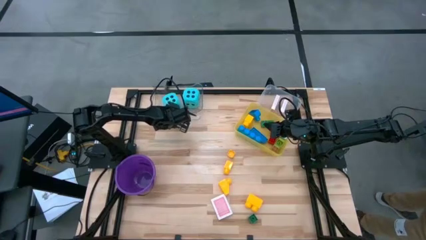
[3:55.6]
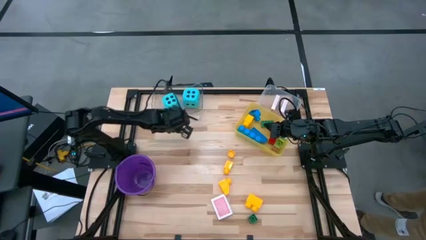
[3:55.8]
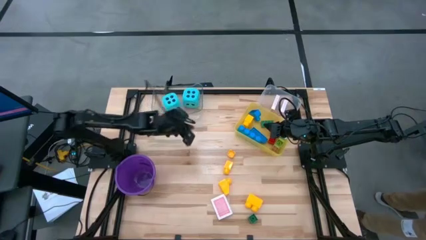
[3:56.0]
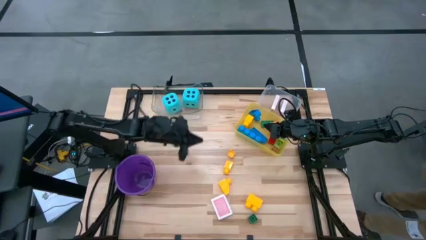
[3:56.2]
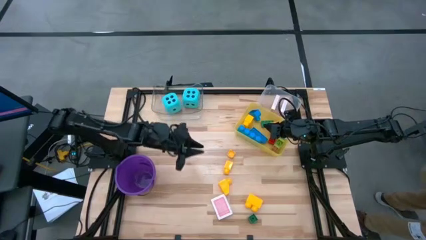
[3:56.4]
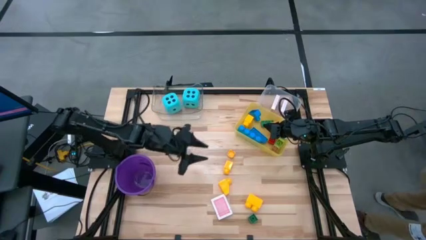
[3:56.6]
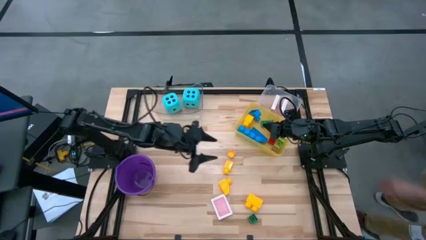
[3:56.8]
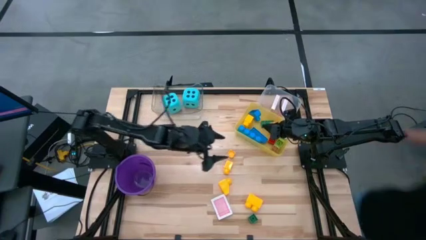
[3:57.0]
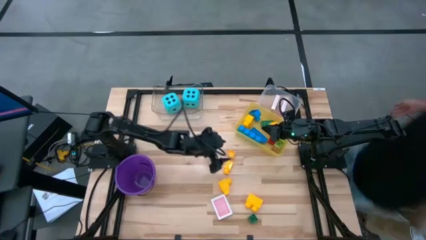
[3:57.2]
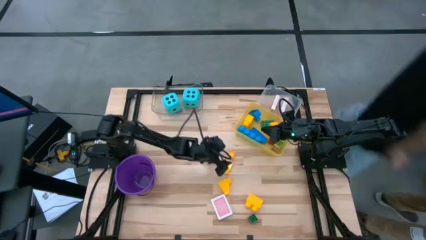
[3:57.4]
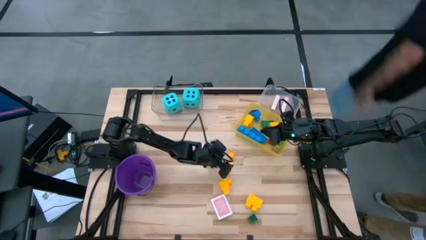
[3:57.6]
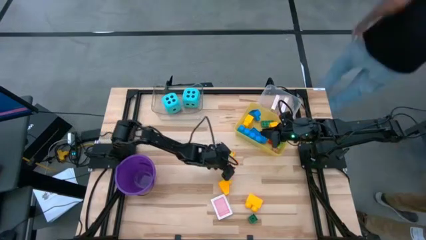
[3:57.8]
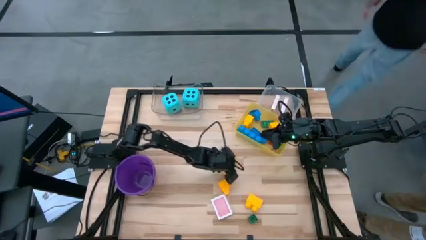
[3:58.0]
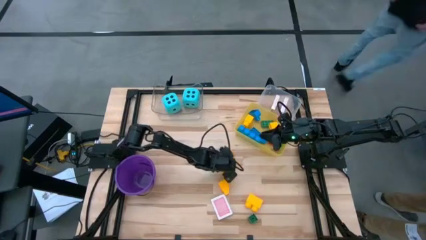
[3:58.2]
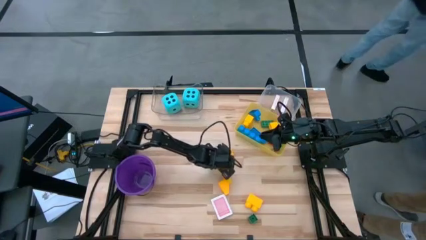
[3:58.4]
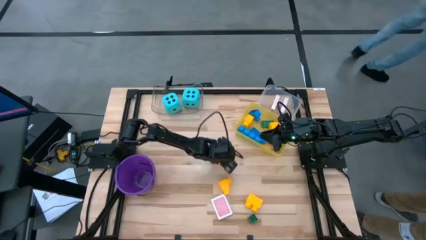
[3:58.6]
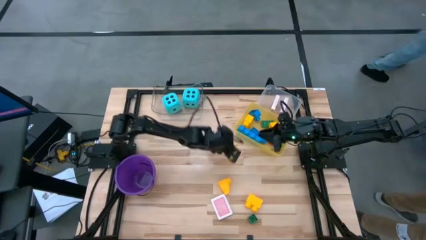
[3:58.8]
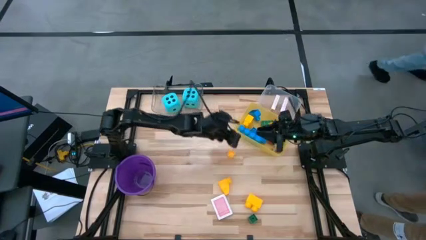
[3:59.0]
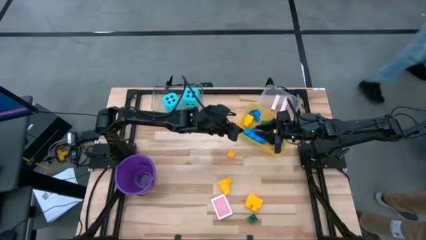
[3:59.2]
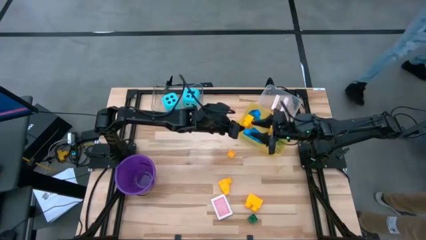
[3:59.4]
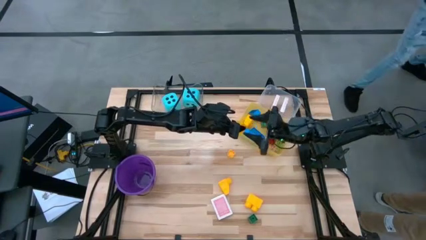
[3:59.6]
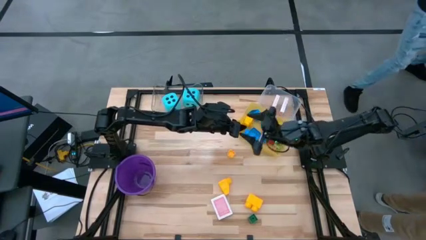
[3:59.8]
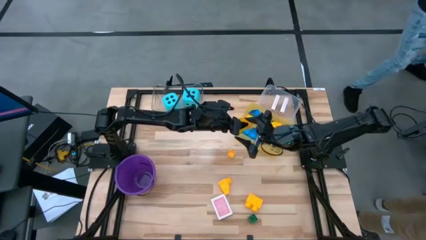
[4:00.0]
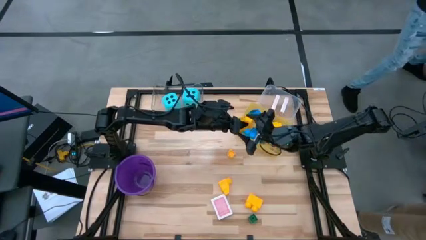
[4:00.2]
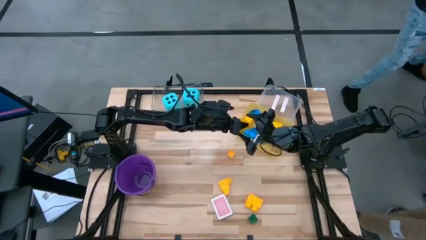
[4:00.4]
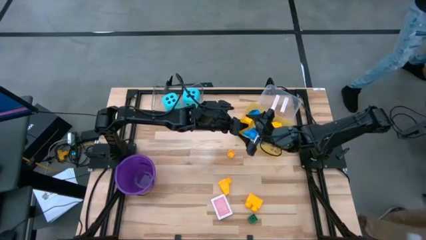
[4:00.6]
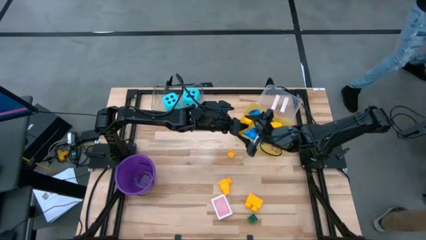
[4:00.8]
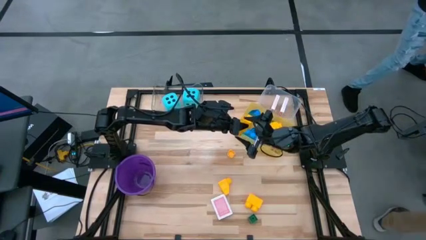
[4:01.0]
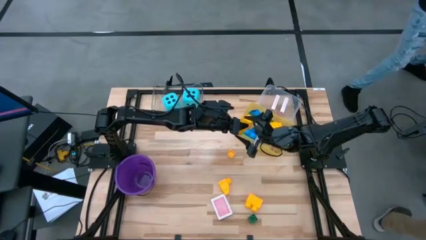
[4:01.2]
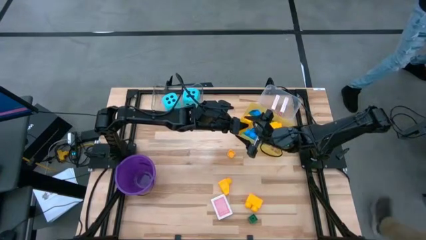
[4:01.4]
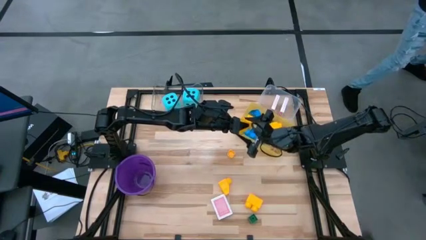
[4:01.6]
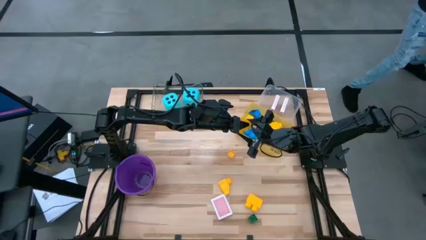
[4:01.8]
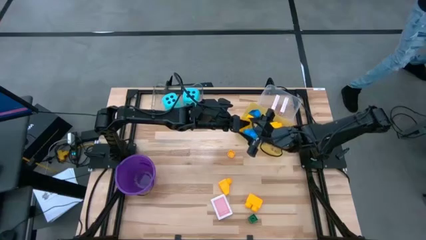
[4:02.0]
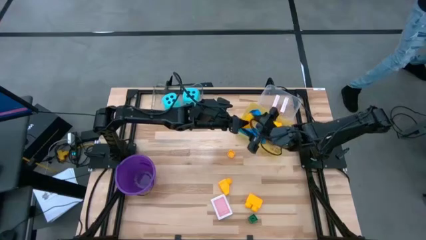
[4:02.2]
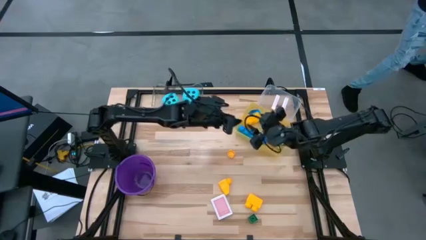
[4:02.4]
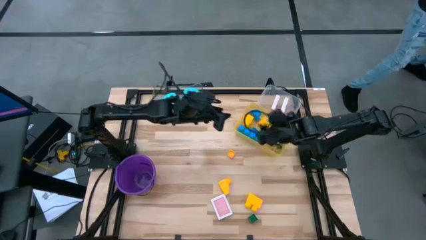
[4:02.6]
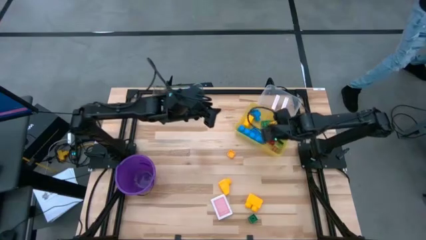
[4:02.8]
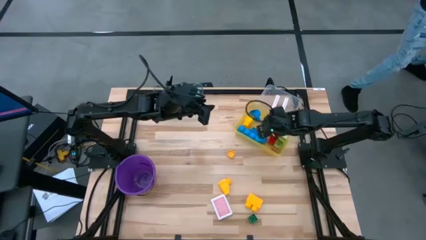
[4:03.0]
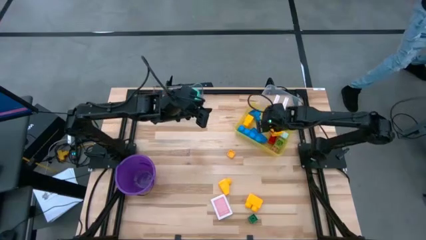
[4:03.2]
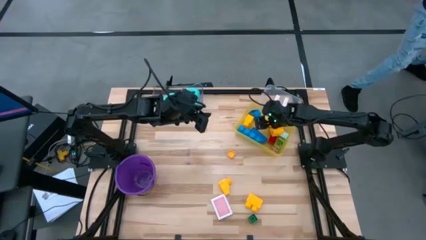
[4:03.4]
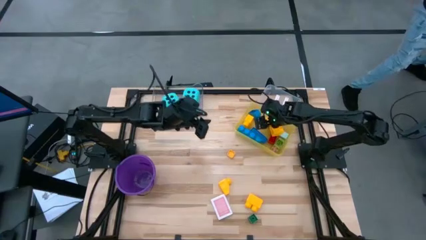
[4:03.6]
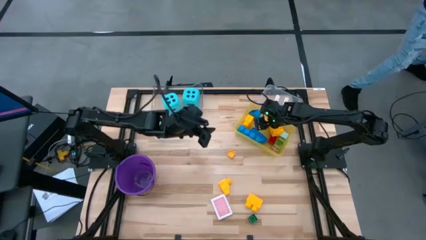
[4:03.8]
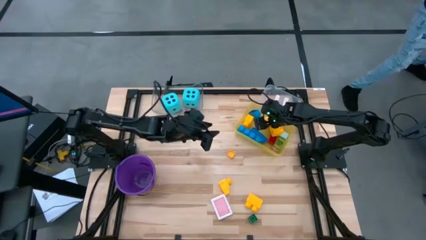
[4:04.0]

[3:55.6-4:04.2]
Task: Pick & Place Toys
Put the yellow game piece into the yellow bin

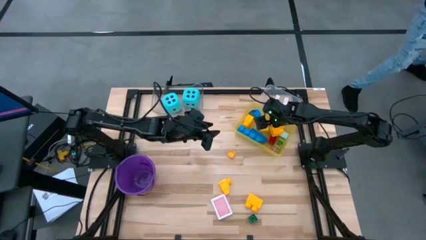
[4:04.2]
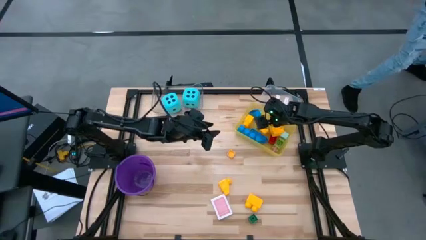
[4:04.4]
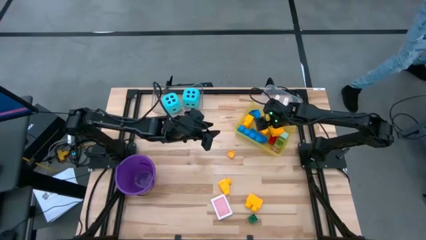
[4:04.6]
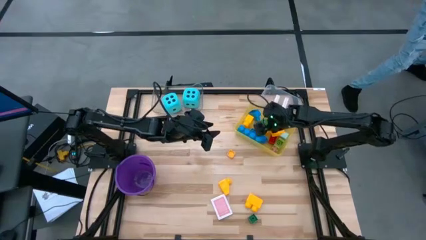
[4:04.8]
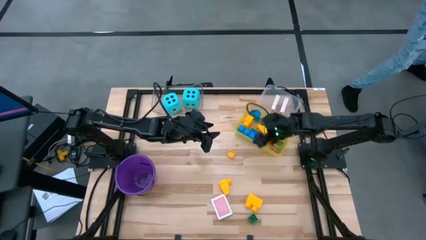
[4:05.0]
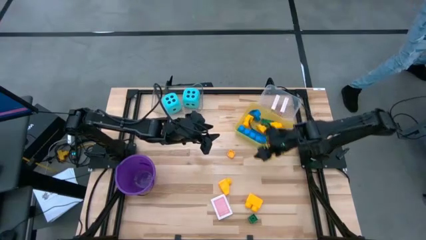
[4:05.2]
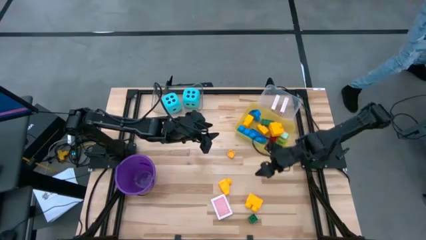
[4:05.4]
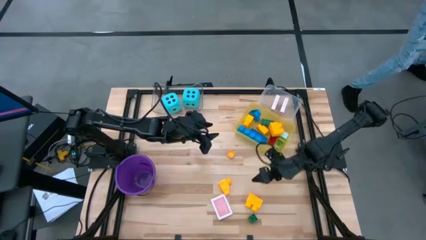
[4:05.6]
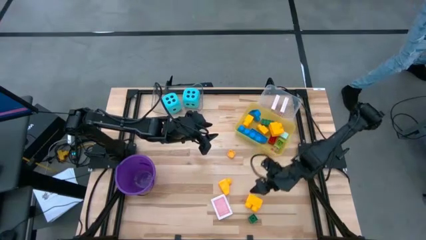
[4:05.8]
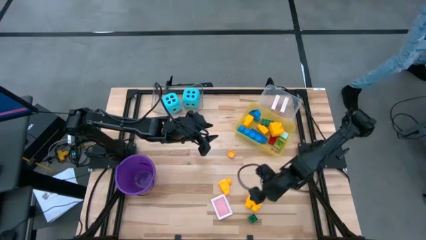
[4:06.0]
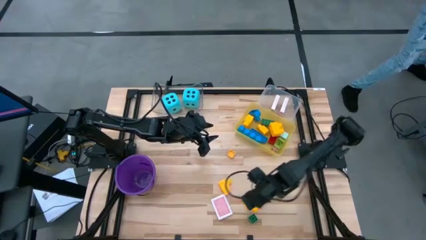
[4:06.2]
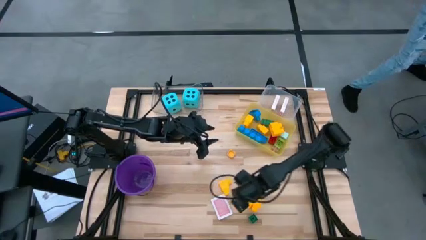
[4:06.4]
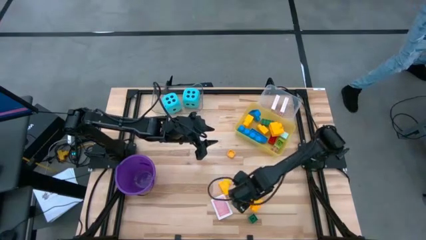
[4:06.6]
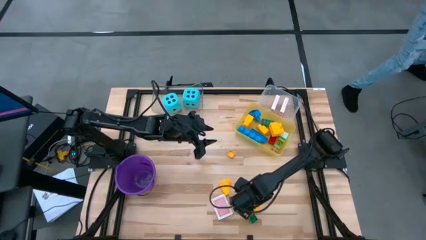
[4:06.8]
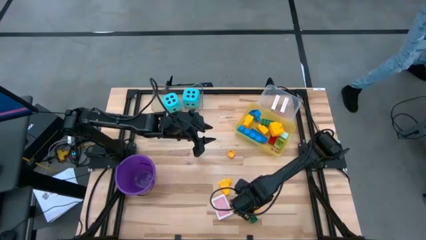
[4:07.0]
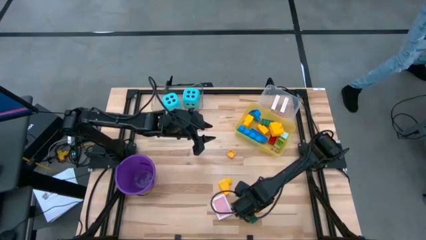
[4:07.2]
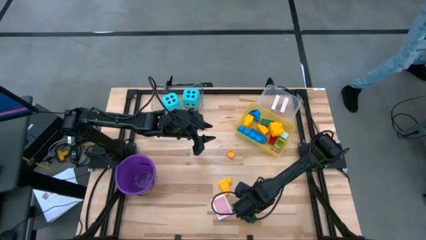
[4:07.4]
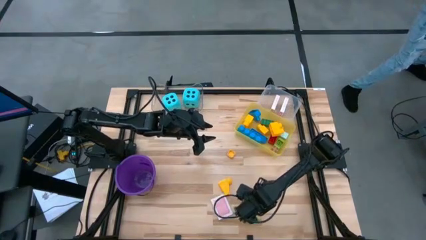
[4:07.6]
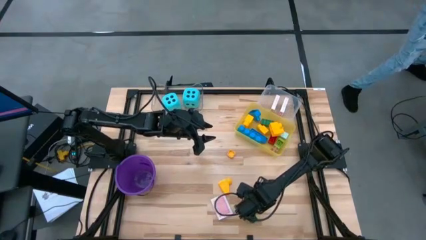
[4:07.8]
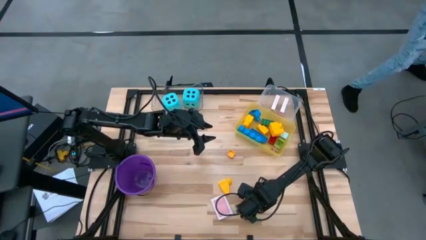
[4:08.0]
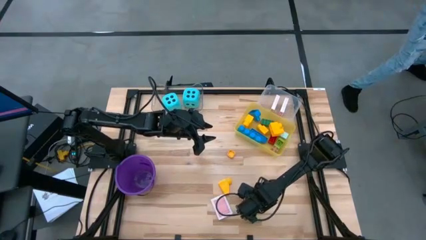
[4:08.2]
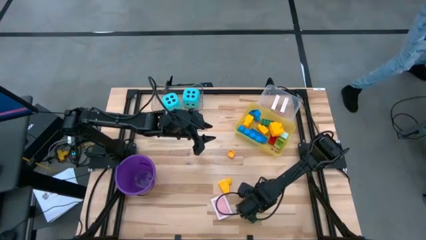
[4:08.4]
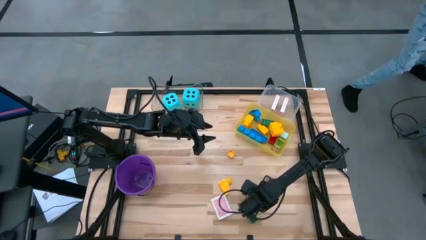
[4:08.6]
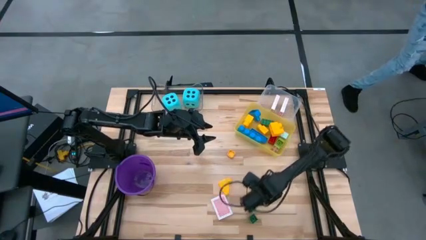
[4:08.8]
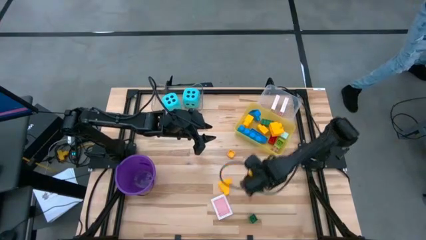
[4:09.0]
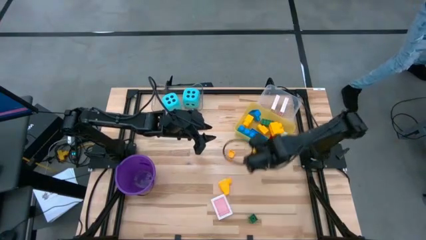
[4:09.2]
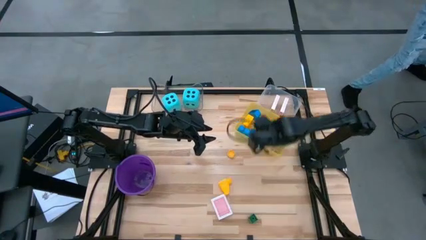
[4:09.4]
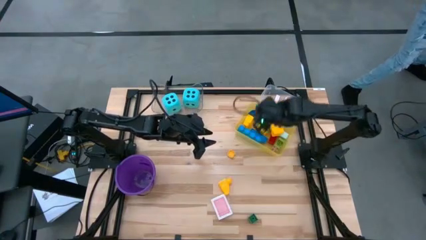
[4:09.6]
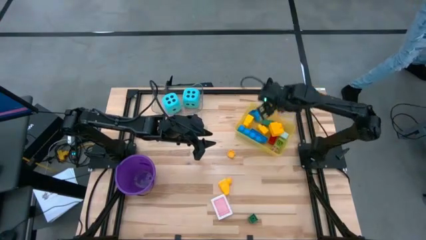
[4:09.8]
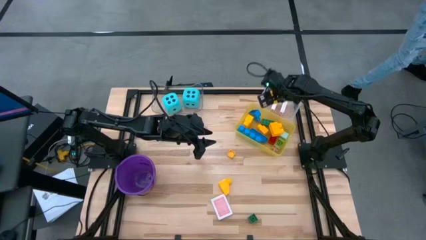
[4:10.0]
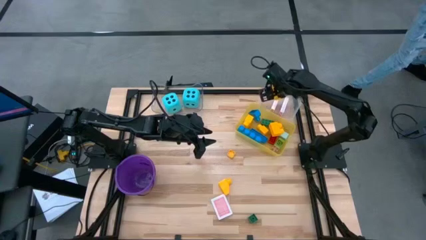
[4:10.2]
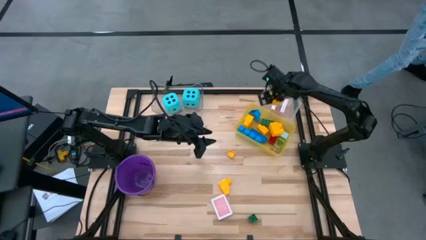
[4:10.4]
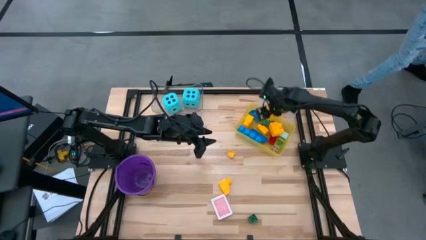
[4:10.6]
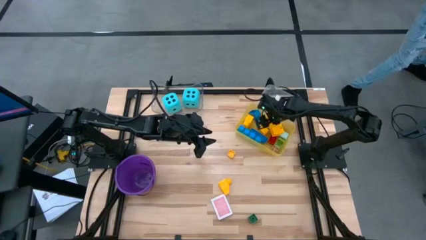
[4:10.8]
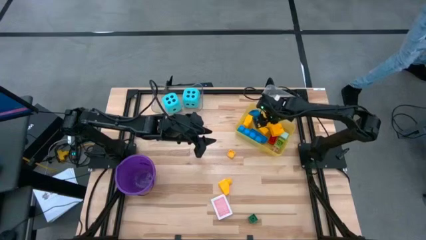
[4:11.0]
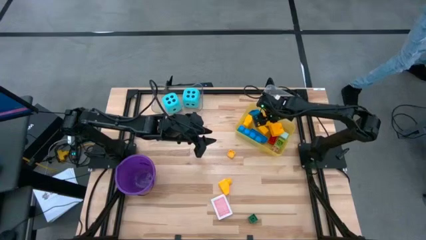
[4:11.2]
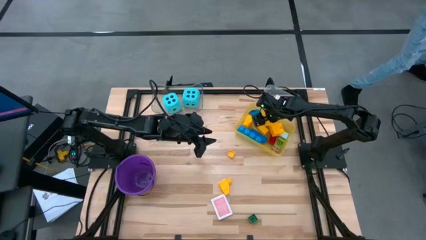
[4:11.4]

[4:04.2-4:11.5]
Put the yellow game piece into the yellow bin
